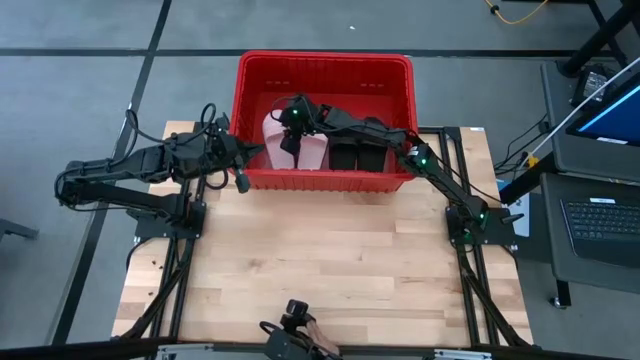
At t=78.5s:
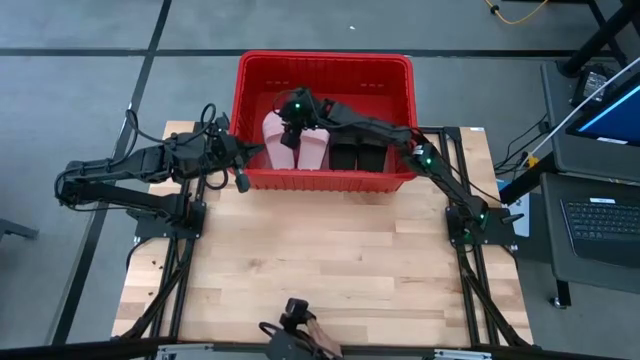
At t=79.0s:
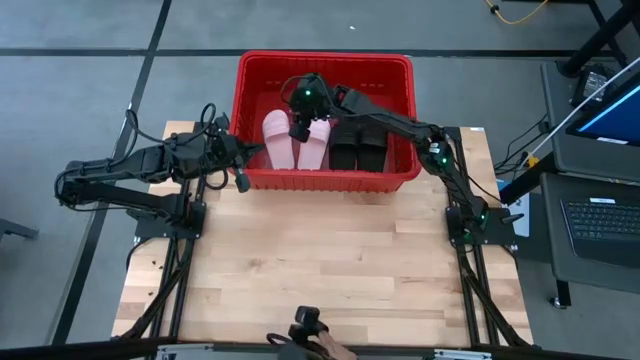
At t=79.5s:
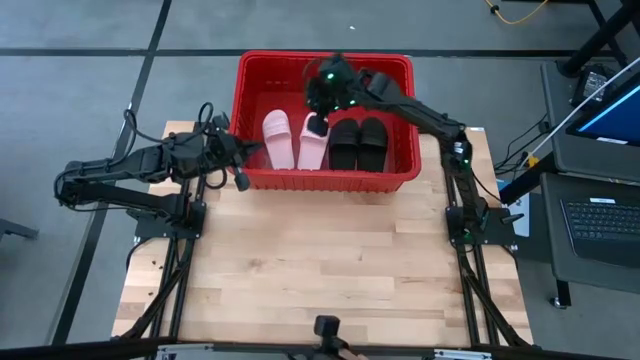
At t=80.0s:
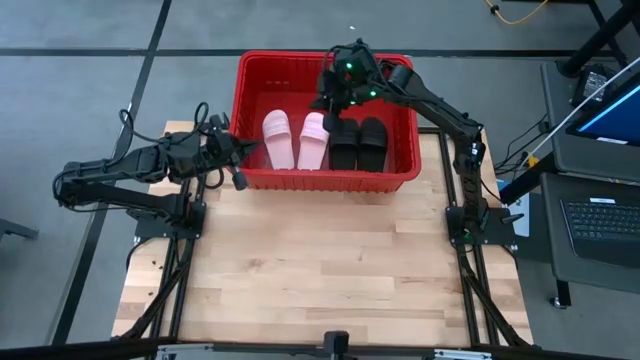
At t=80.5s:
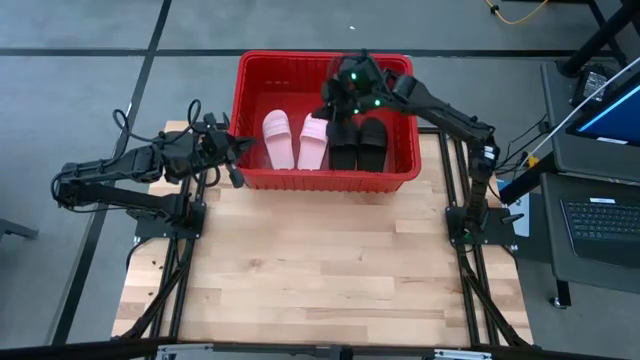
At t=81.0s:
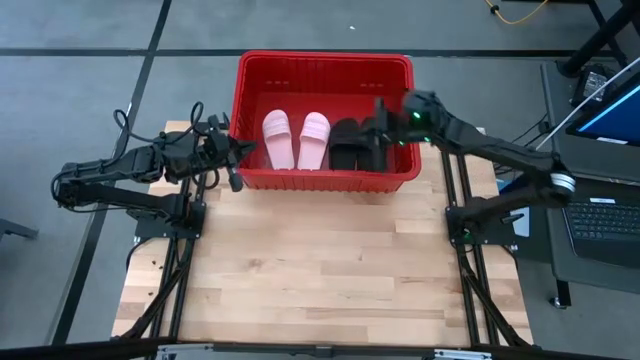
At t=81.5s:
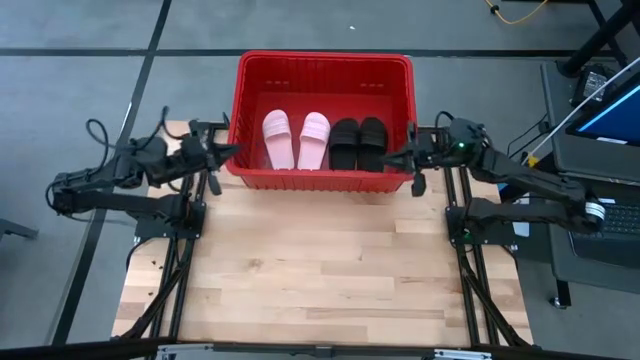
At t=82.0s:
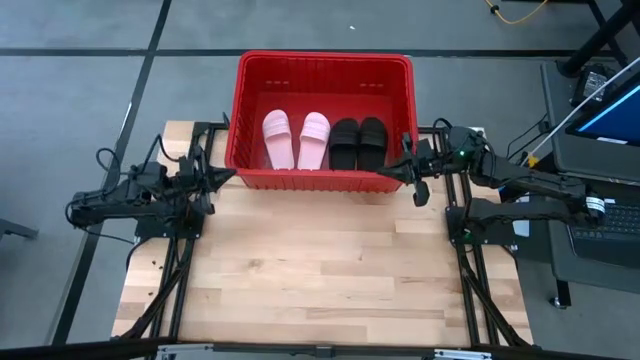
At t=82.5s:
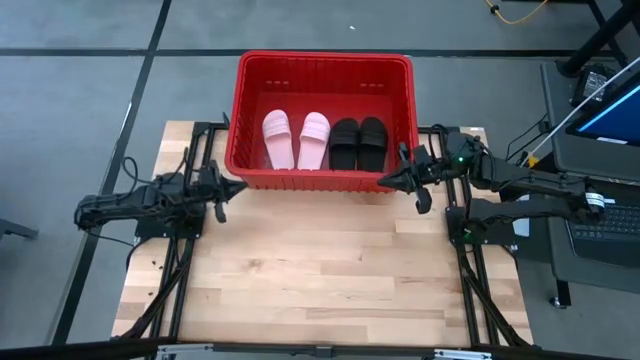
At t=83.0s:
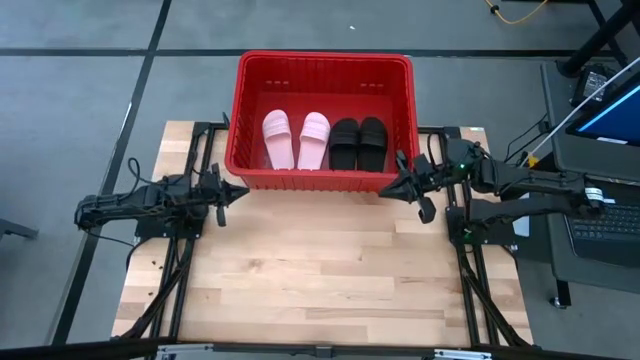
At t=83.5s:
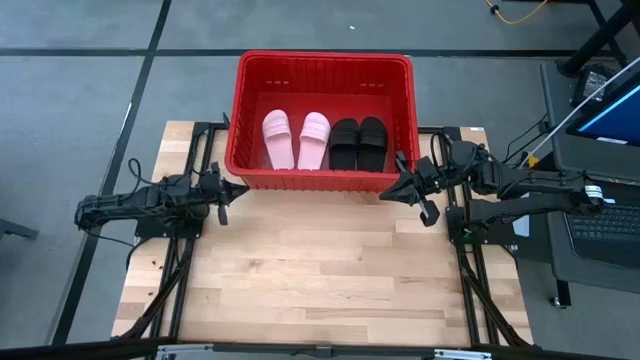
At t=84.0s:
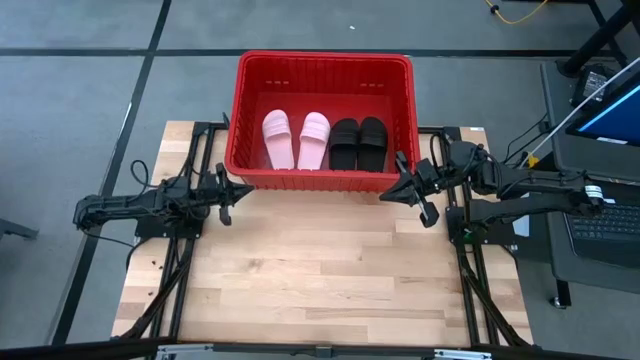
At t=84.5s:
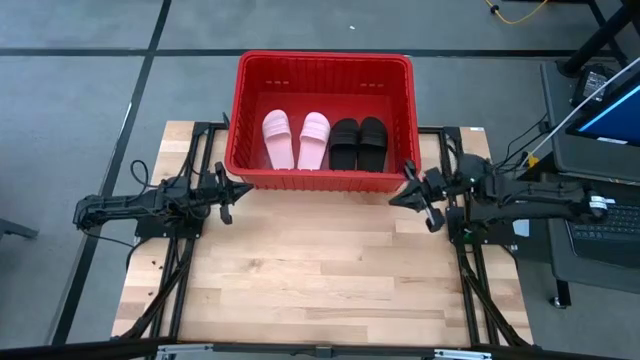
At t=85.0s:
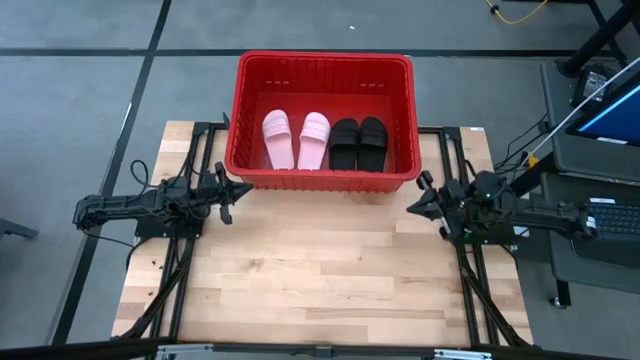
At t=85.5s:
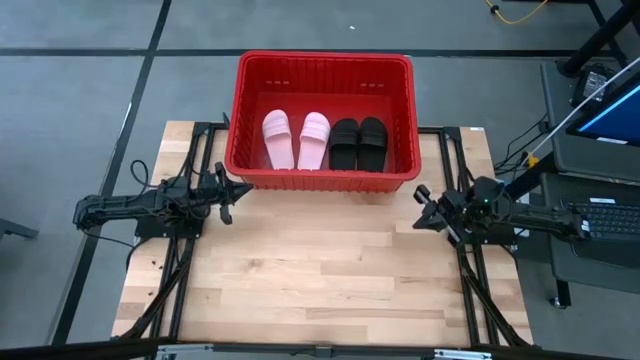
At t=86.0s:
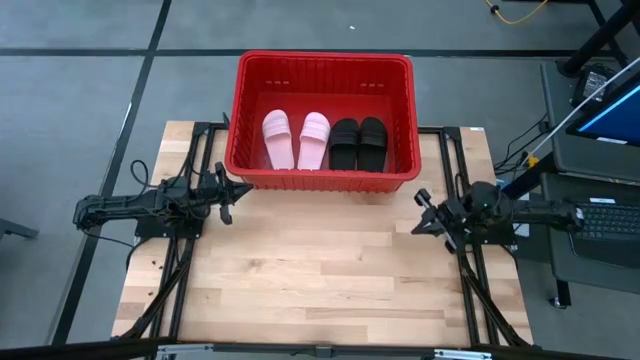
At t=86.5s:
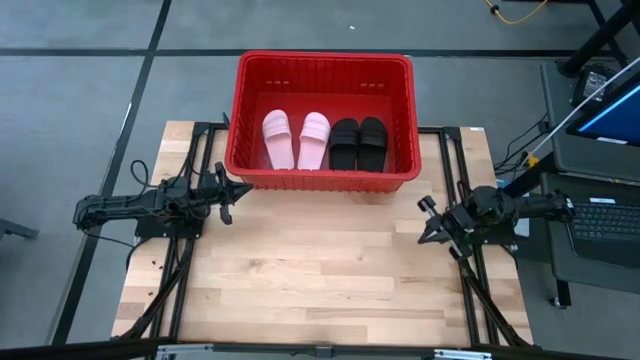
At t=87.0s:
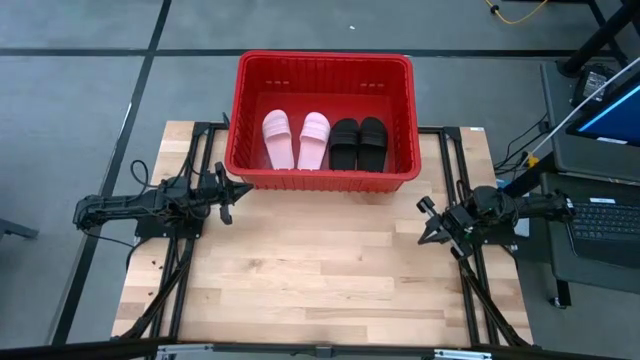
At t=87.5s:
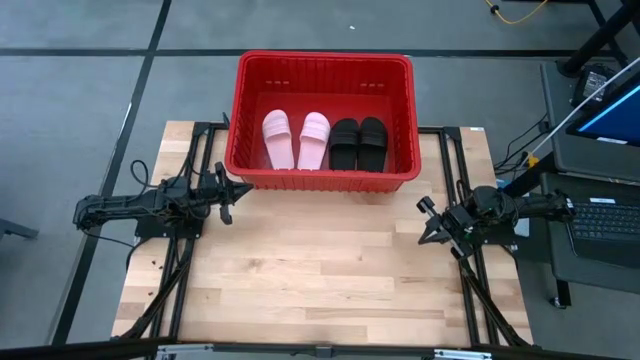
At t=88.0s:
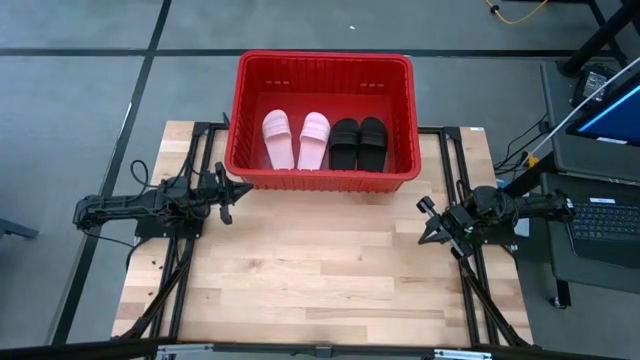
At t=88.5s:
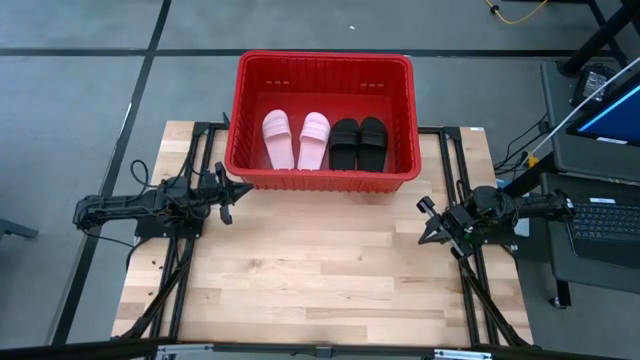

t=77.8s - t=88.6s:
Task: Pick and place slides into bin
Return to Home Position

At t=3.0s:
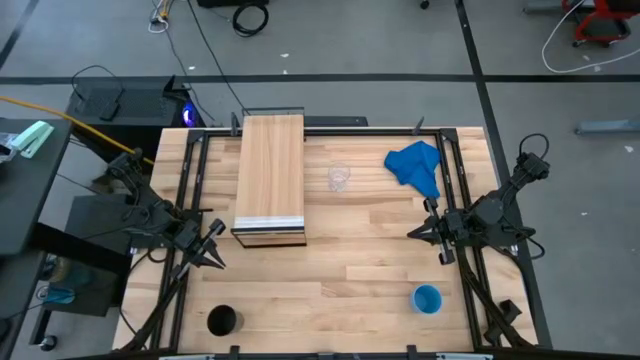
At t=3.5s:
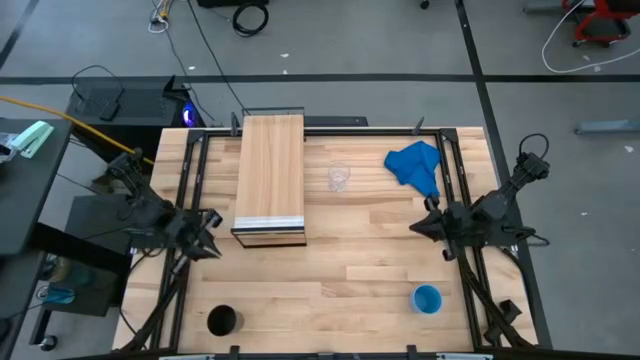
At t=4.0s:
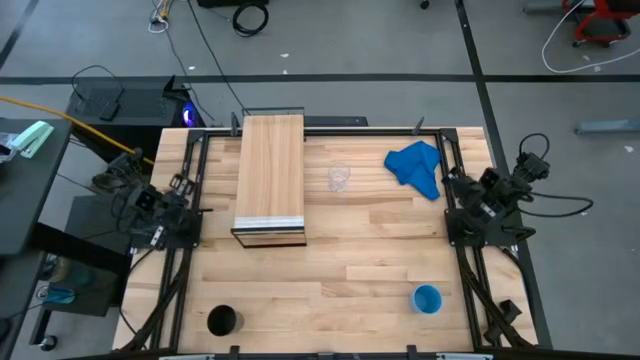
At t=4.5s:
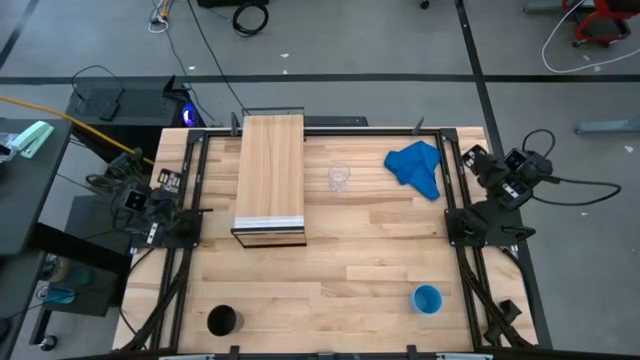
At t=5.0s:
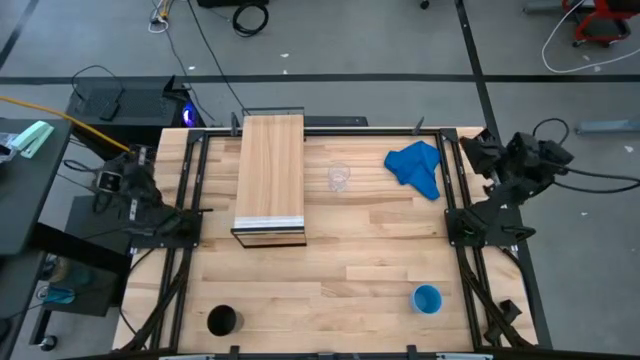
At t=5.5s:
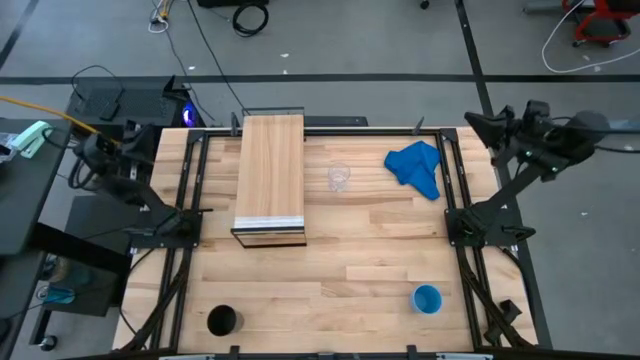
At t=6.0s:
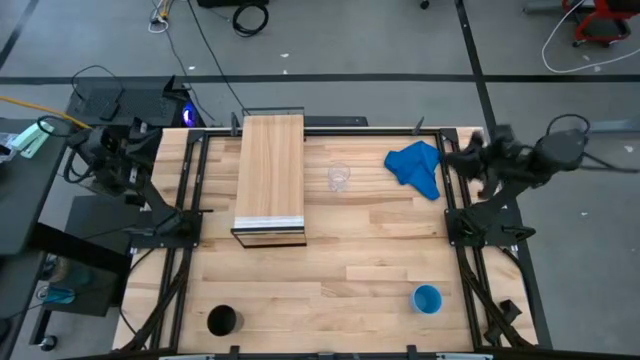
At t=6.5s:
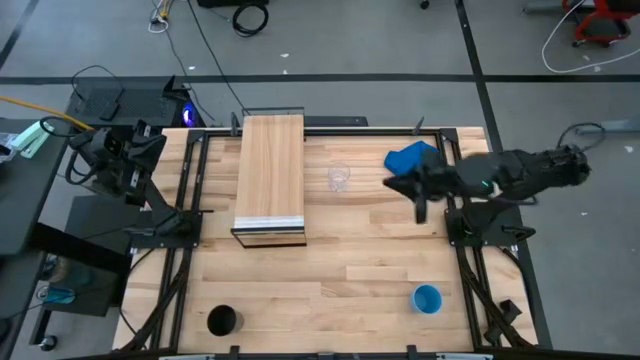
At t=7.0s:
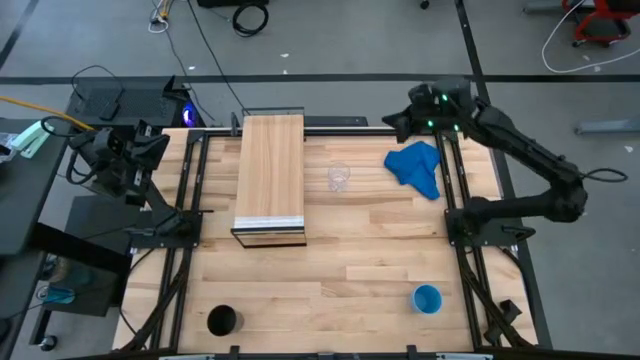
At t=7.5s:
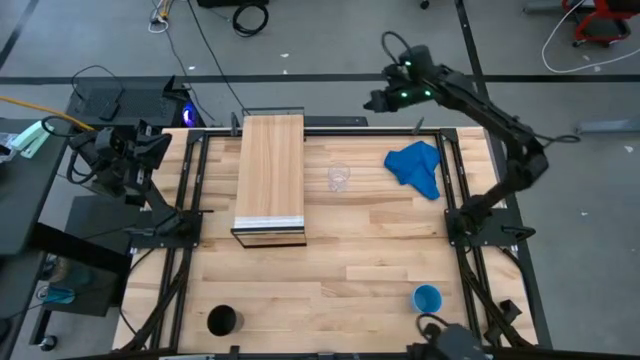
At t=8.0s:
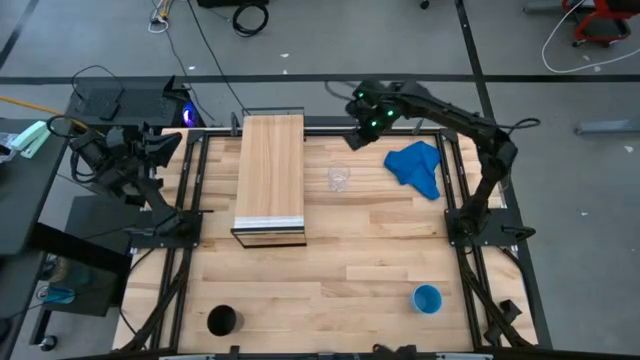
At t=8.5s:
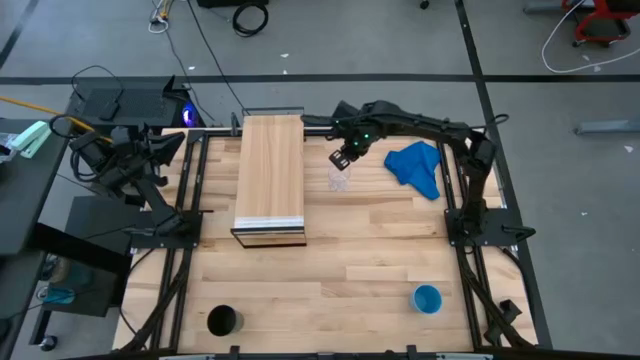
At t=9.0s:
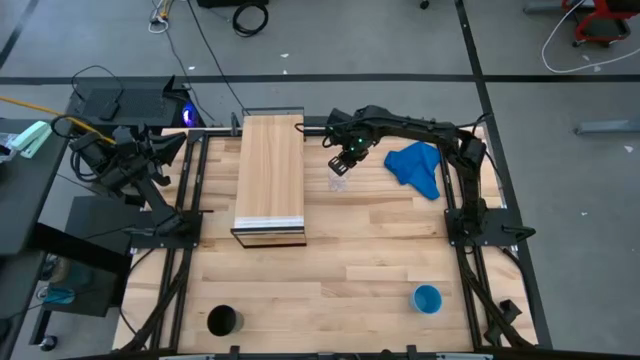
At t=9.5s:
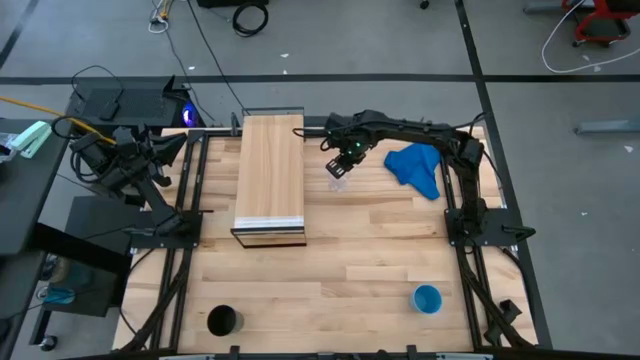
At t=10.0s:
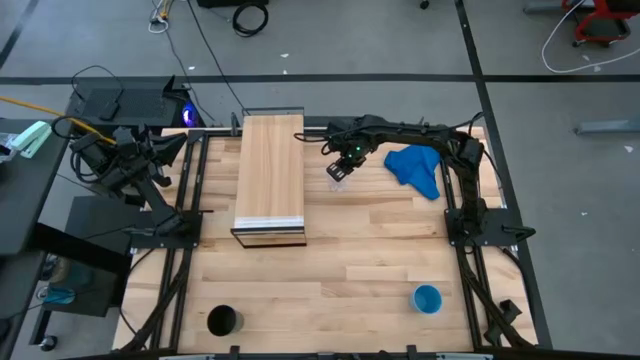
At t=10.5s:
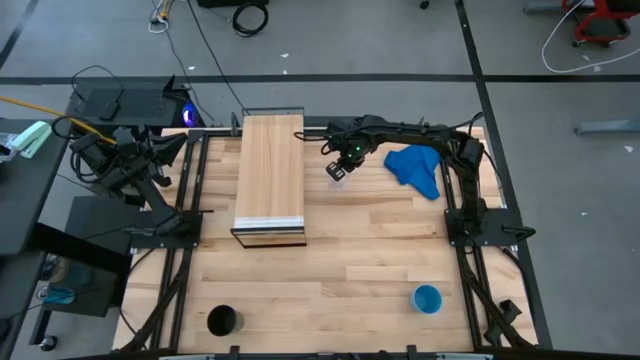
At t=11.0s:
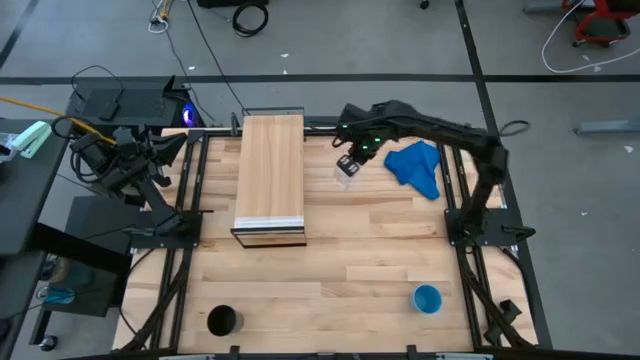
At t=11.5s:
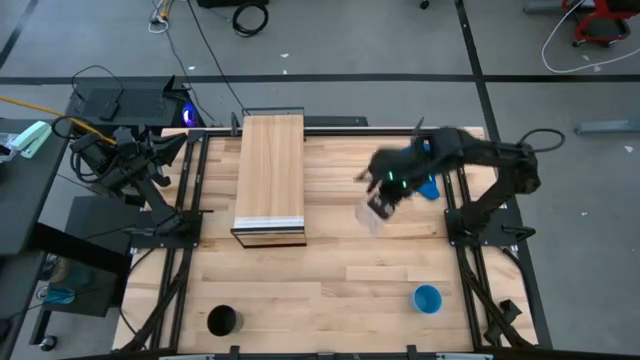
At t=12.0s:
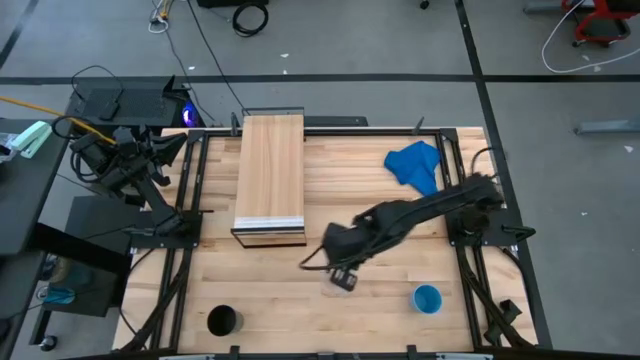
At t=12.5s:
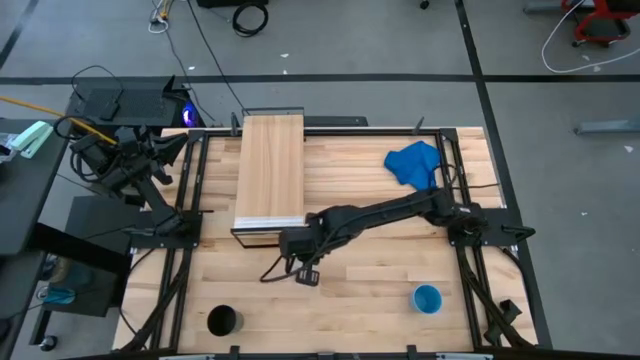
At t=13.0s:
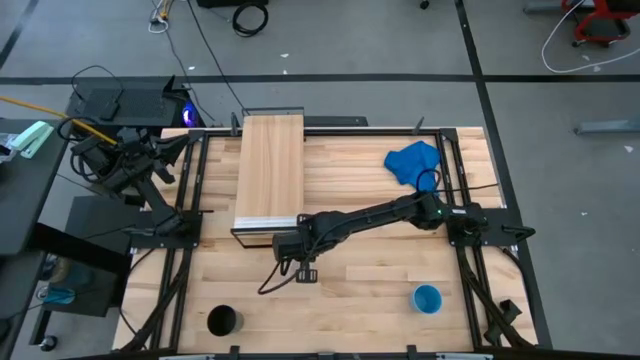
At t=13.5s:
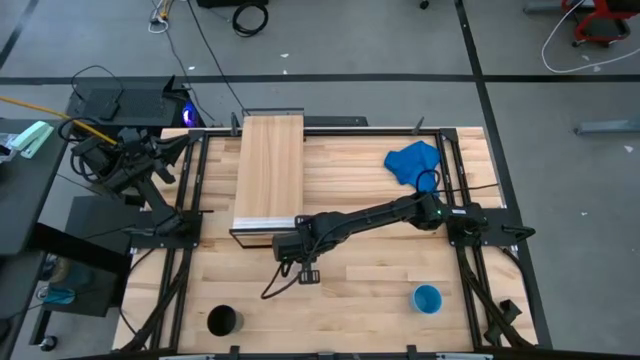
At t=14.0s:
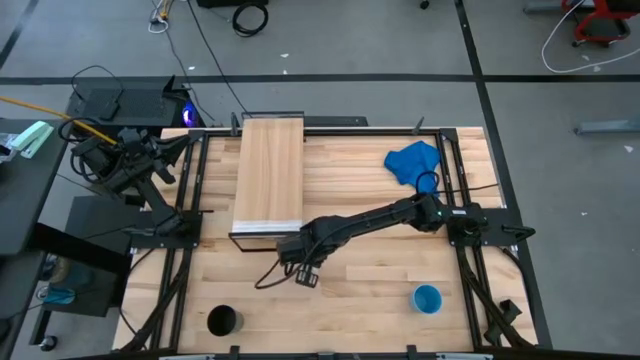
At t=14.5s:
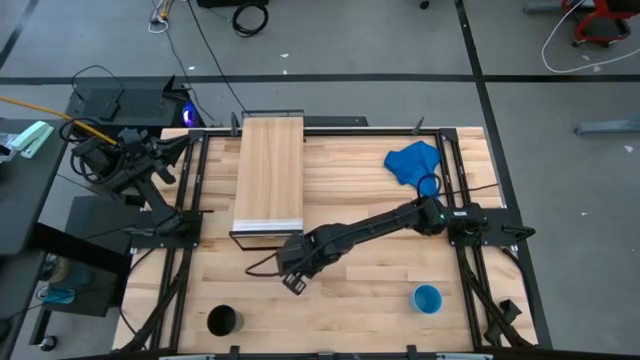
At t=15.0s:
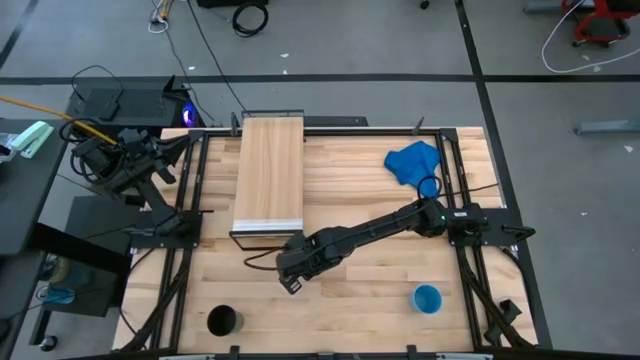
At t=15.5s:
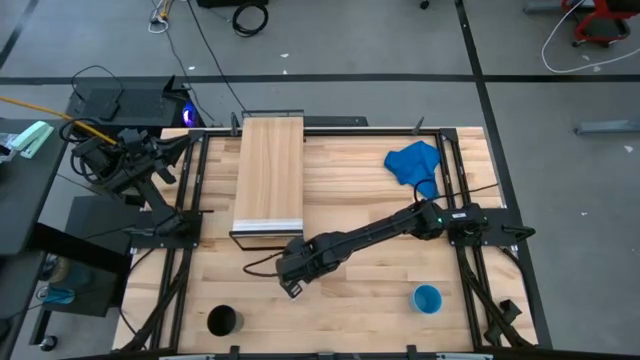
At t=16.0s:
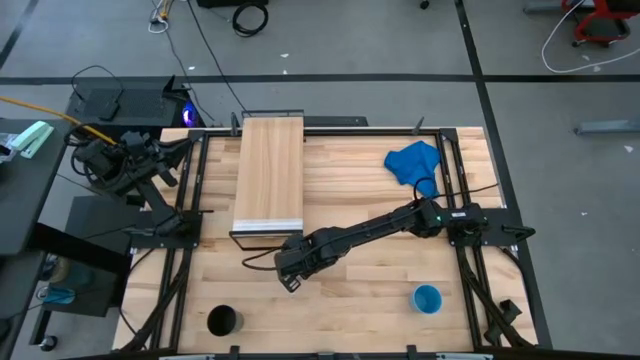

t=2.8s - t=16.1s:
Task: Stack small to large cups/mugs on shelf
Move the transparent mug to the bottom left of the table
